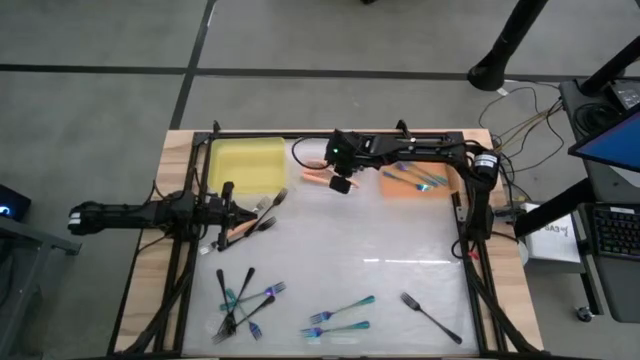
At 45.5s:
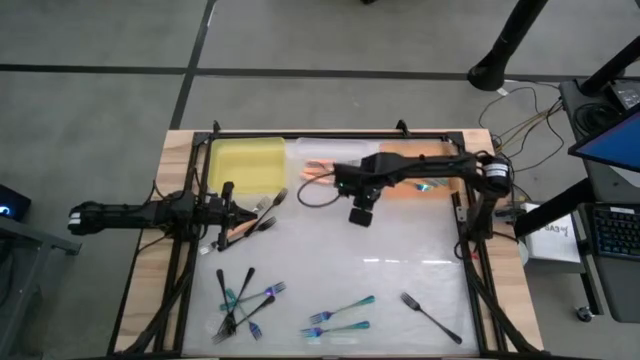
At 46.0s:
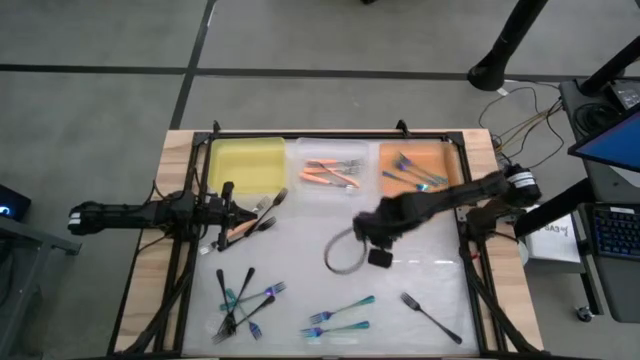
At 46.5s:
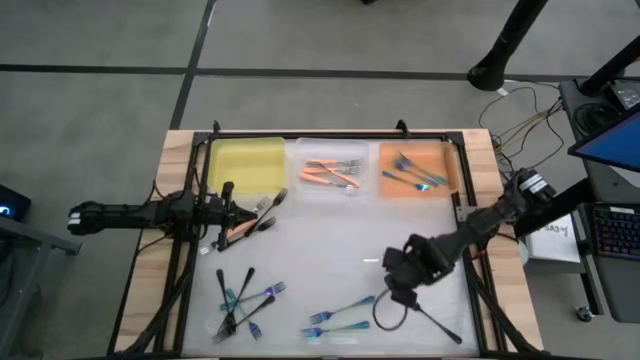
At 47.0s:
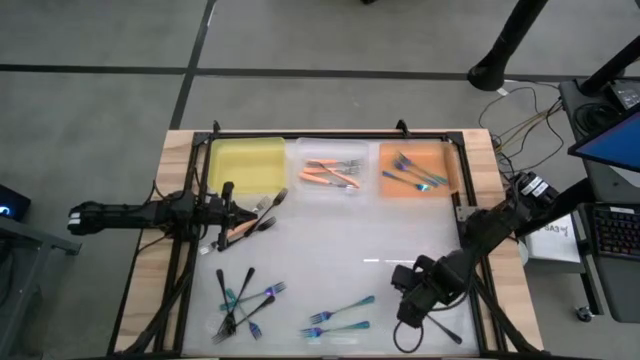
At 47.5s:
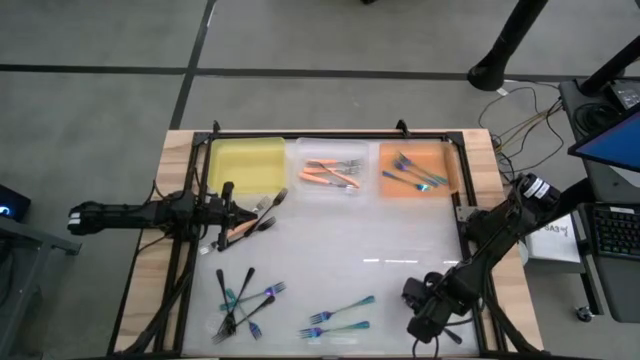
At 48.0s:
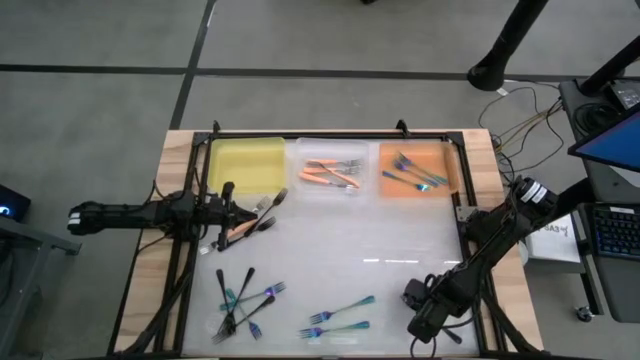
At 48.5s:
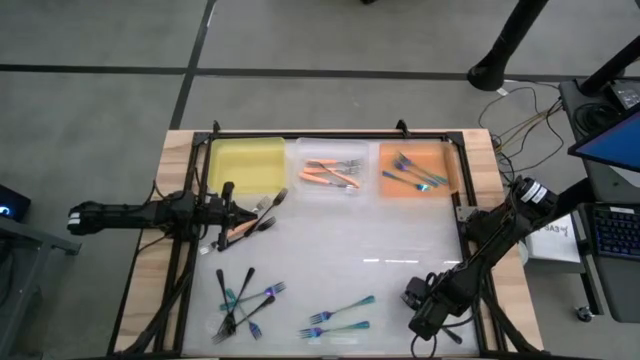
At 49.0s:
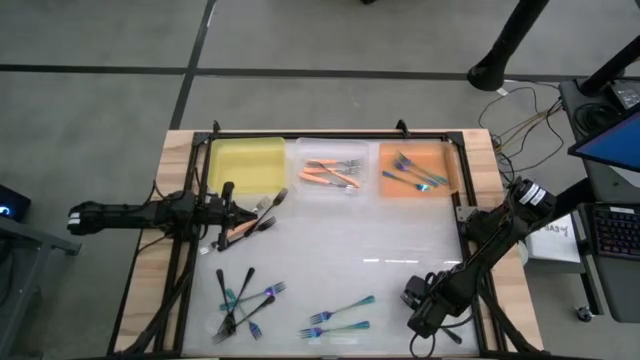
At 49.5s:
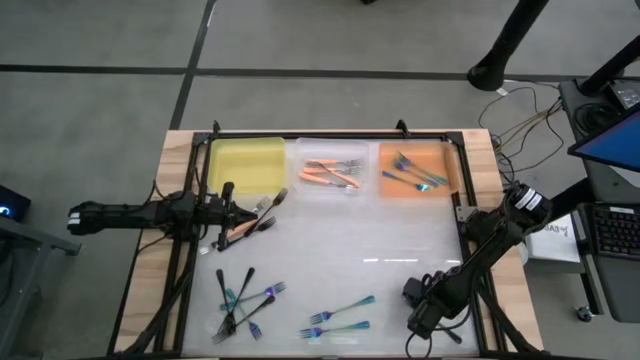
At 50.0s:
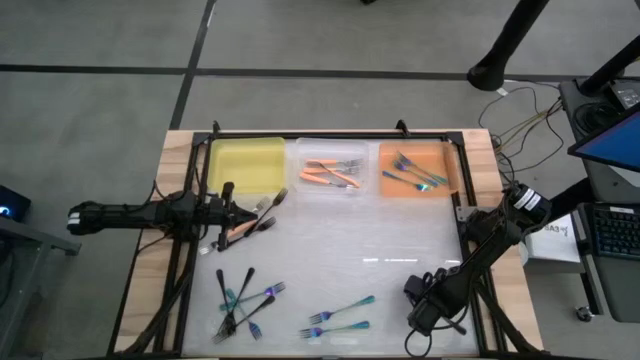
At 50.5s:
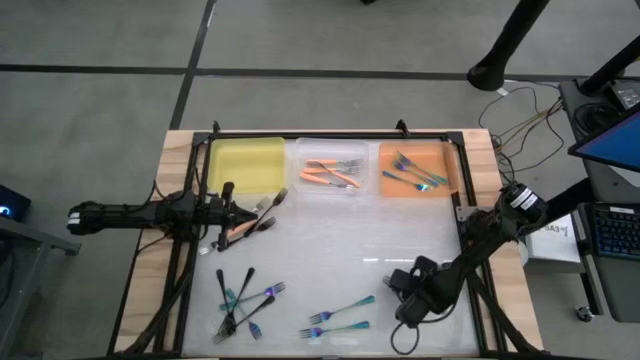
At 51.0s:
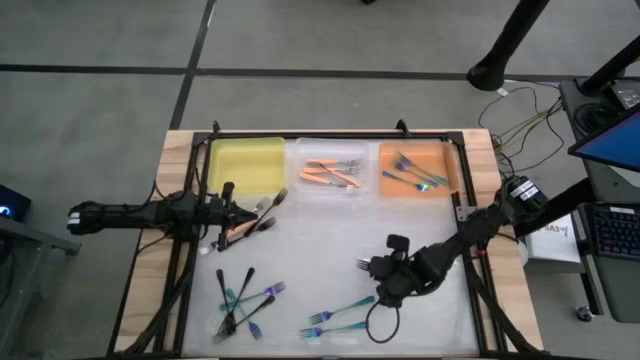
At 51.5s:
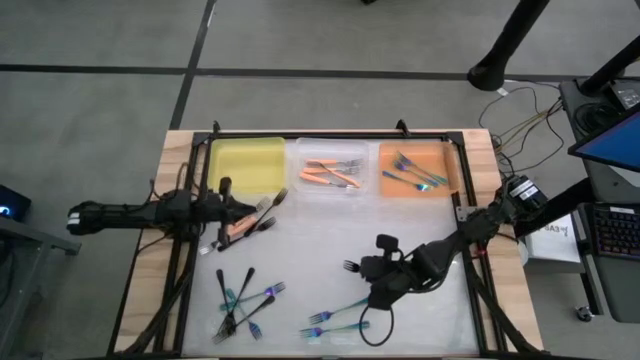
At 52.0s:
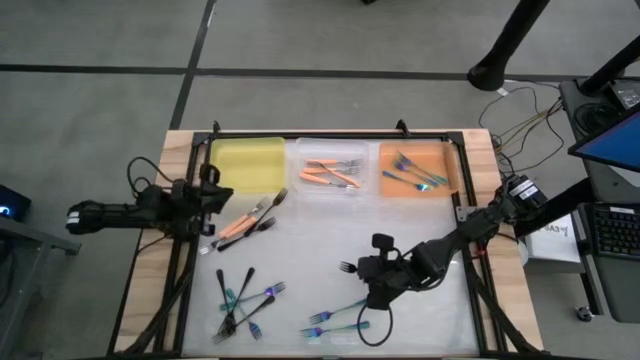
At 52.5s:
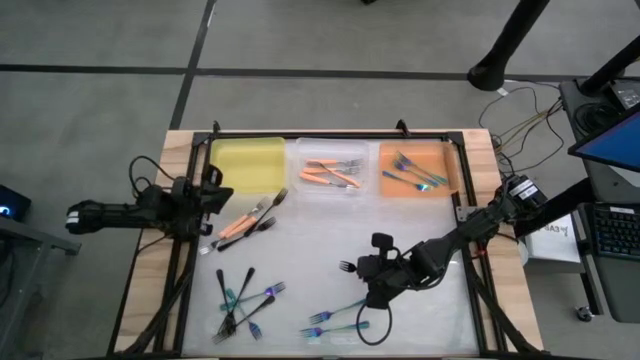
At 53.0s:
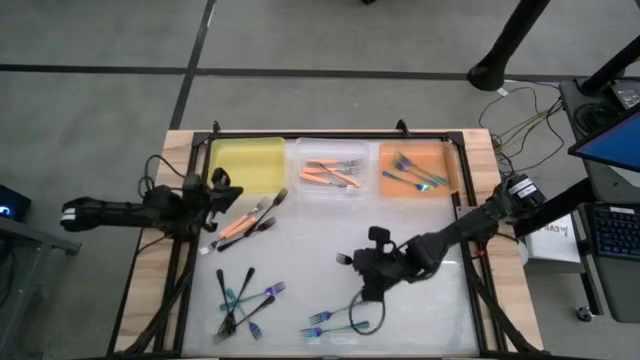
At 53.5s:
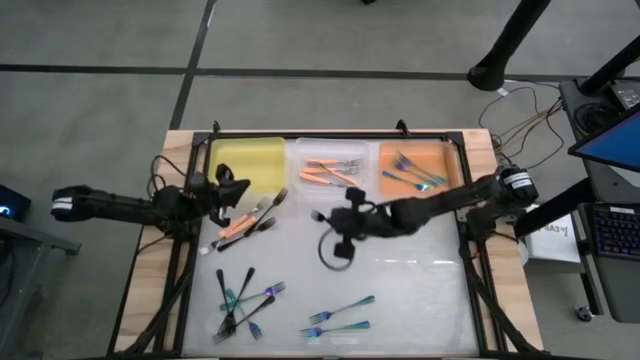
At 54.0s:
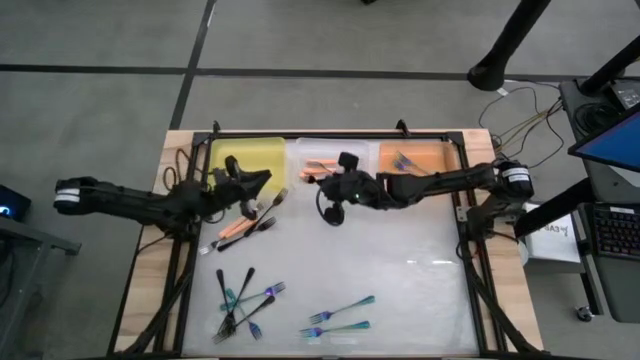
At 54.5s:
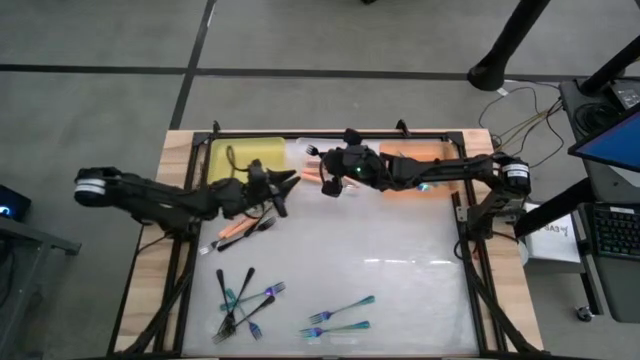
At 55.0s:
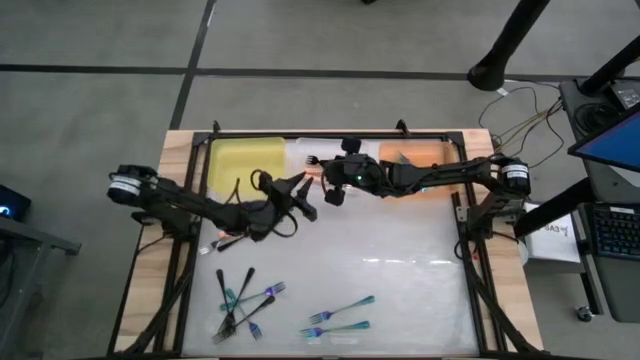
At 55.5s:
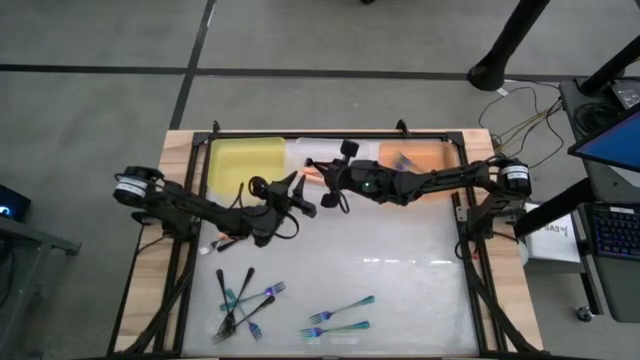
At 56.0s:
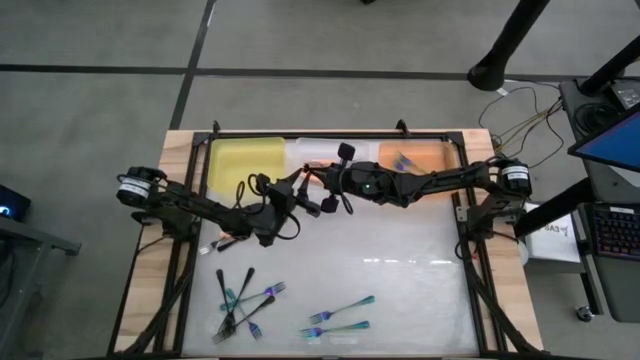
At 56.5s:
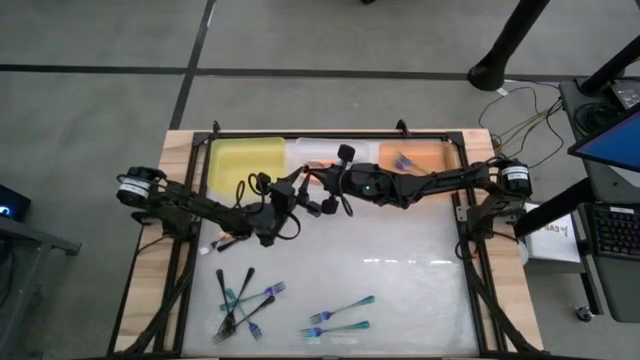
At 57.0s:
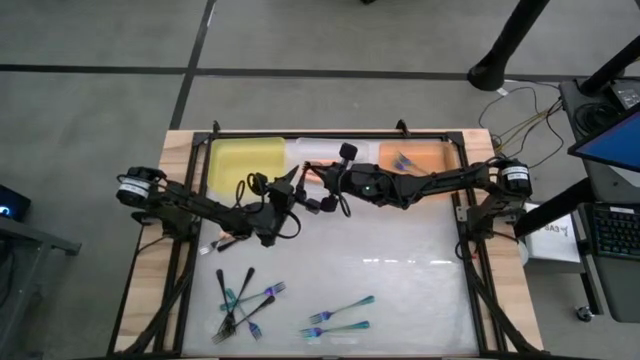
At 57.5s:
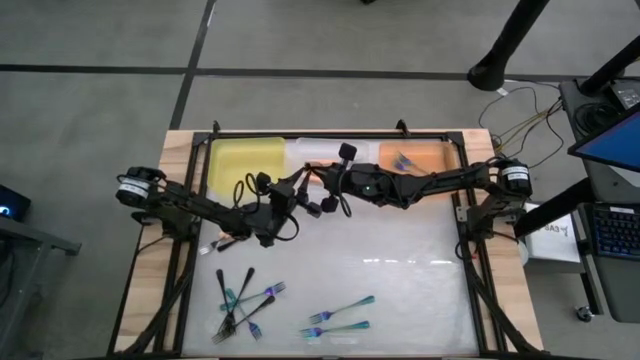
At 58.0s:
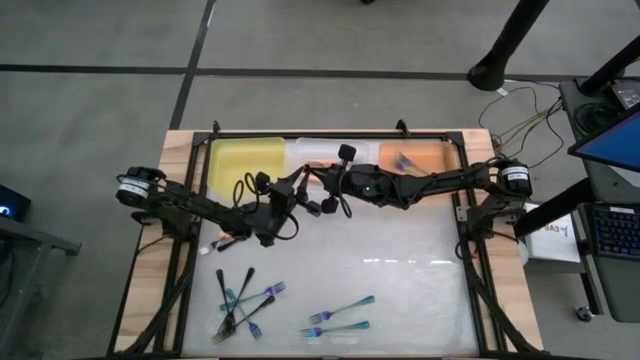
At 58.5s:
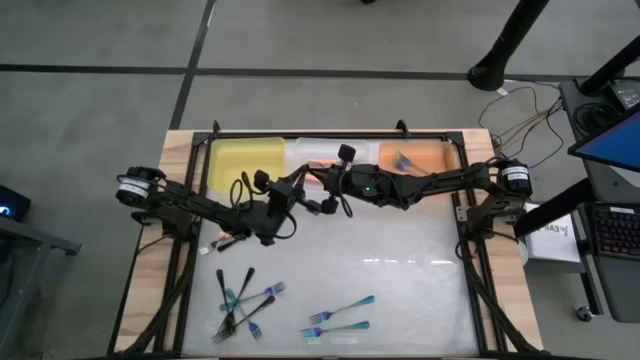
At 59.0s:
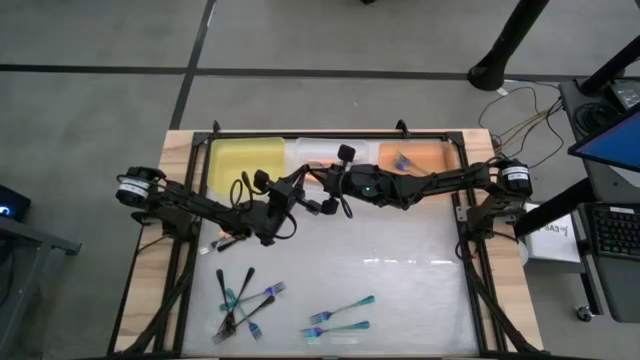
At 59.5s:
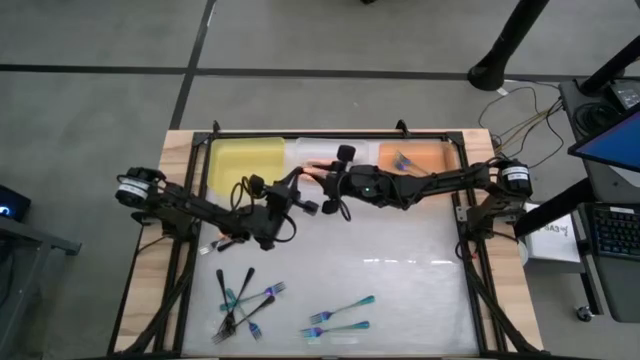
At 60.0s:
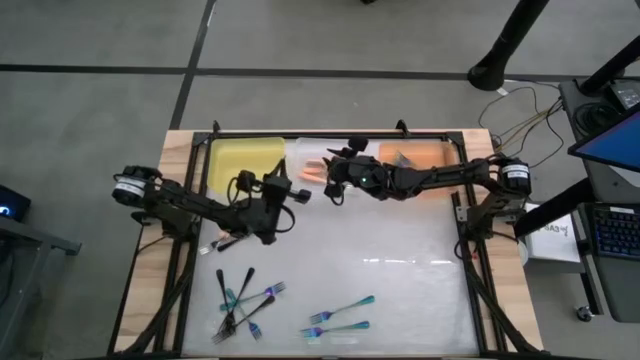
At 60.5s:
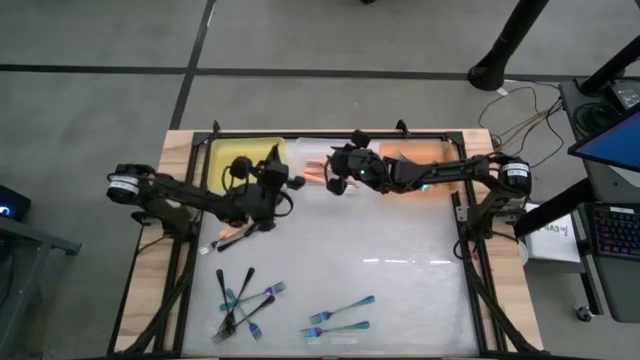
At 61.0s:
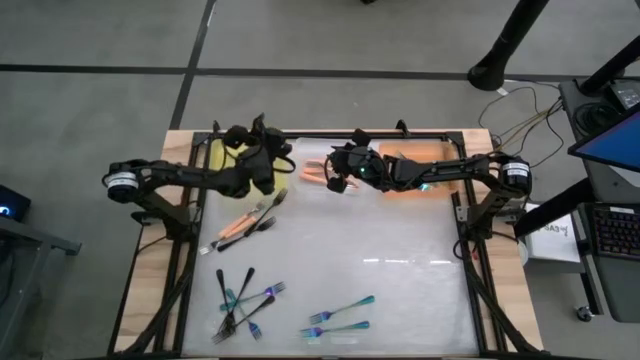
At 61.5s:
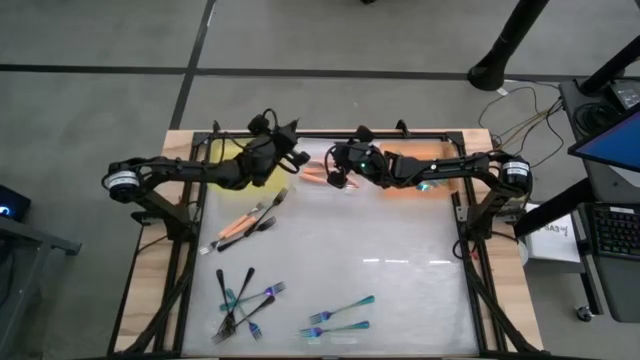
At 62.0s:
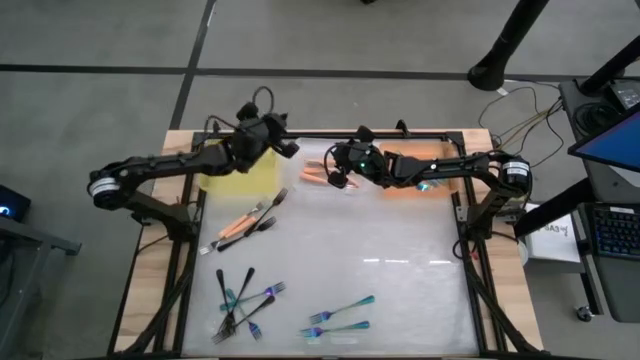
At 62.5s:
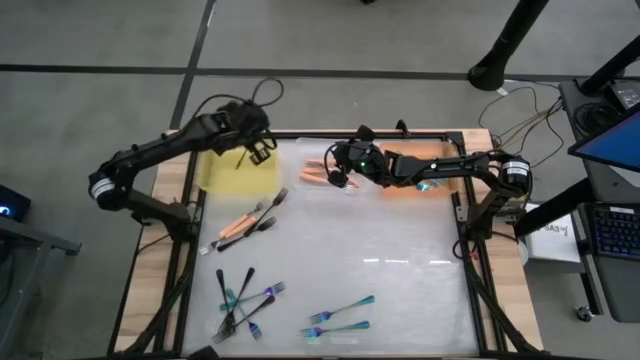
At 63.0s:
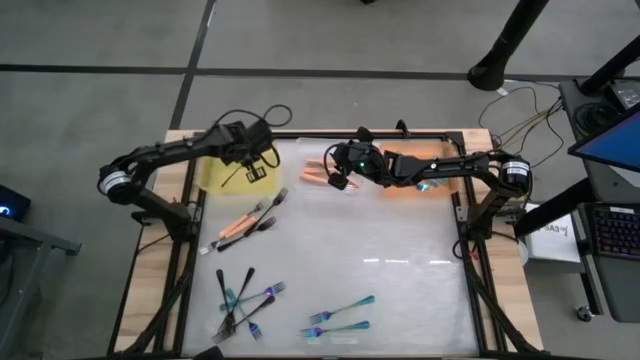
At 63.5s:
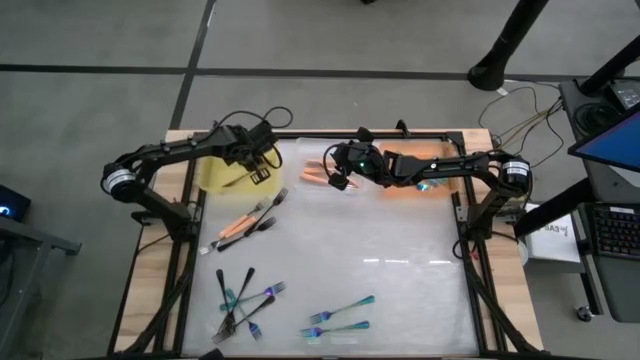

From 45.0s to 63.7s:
Task: Sort silverware by color (type)
Put the black fork into the yellow bin

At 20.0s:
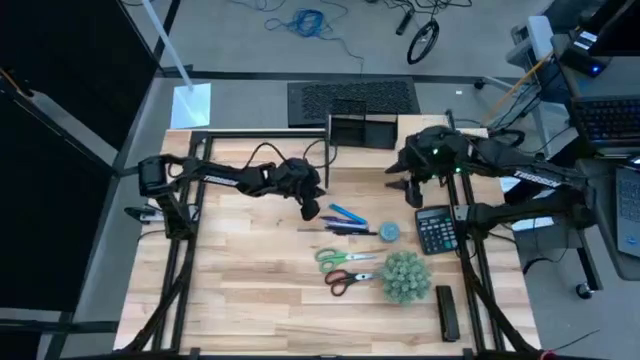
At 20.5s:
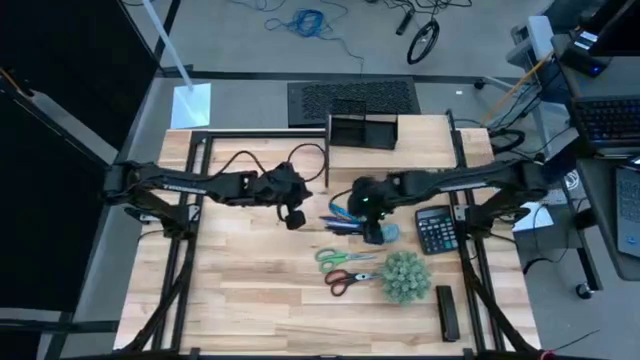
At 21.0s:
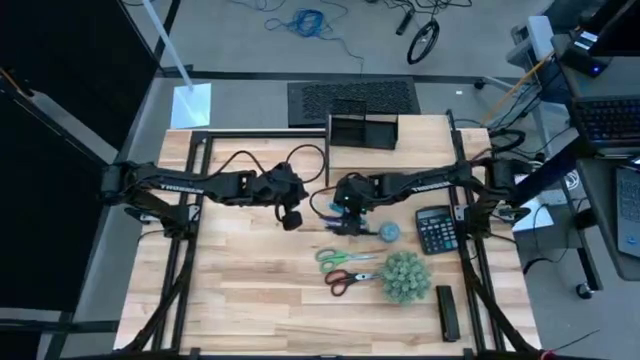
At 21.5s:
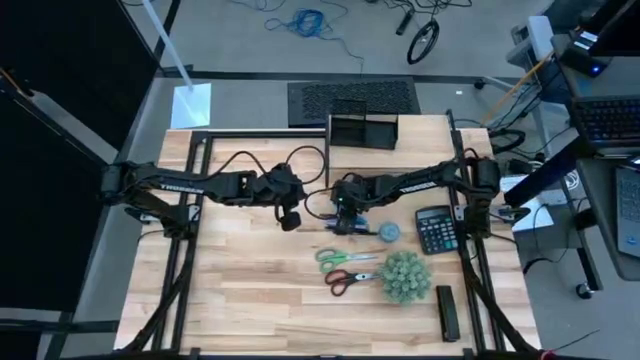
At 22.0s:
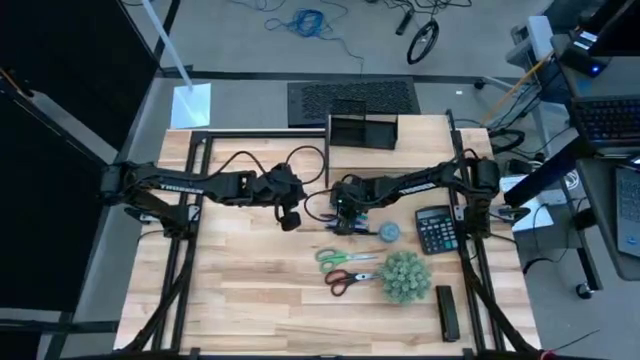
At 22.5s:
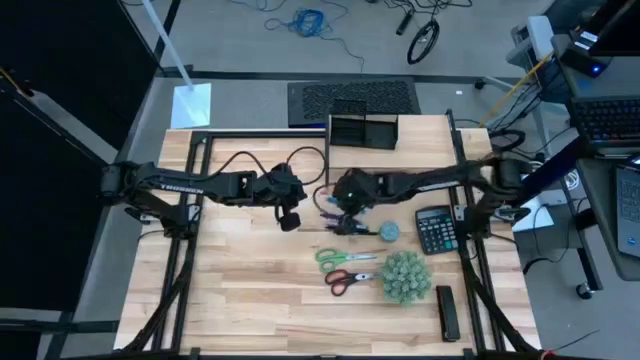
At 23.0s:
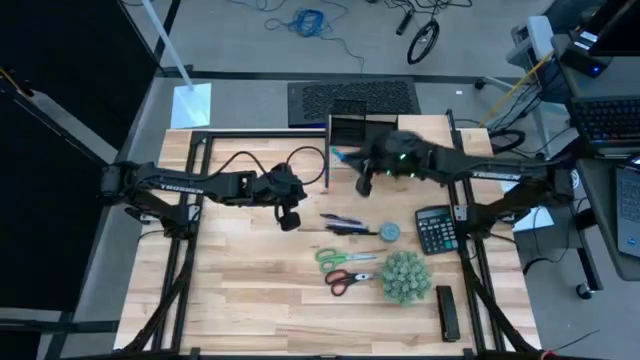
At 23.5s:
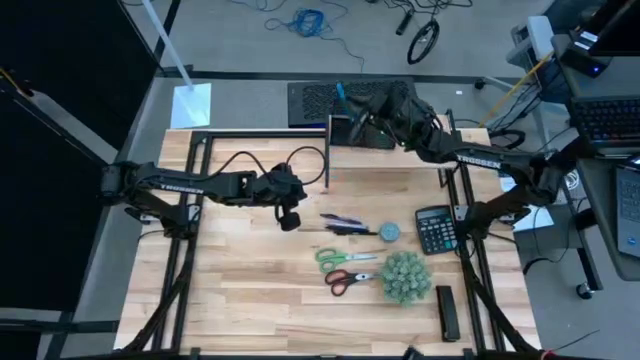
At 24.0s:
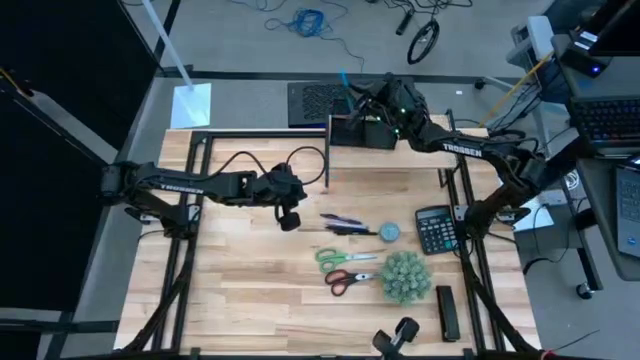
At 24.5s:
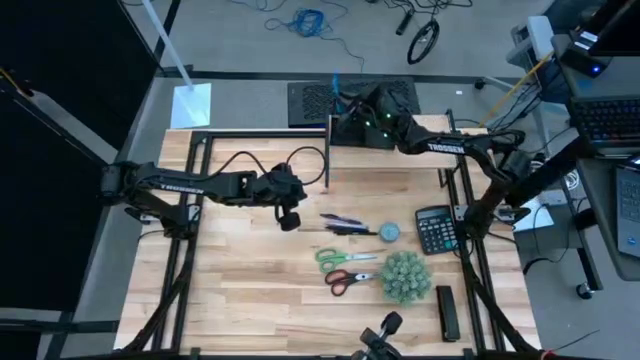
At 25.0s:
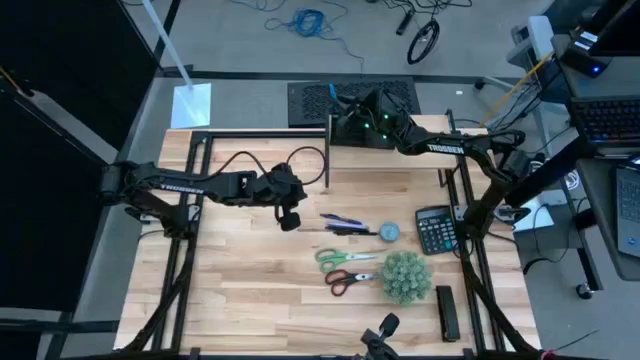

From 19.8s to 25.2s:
Task: Pick and place office supplies into organizer
Put the light blue pen into the black desk organizer on the shelf
